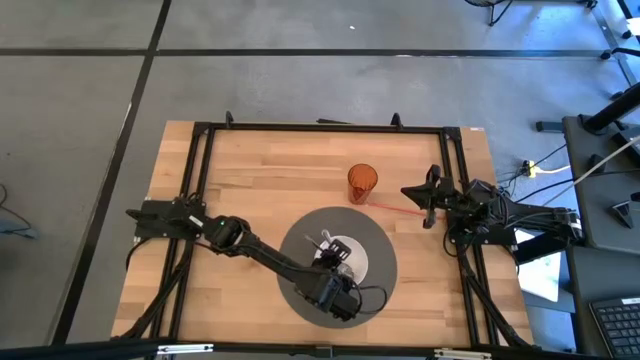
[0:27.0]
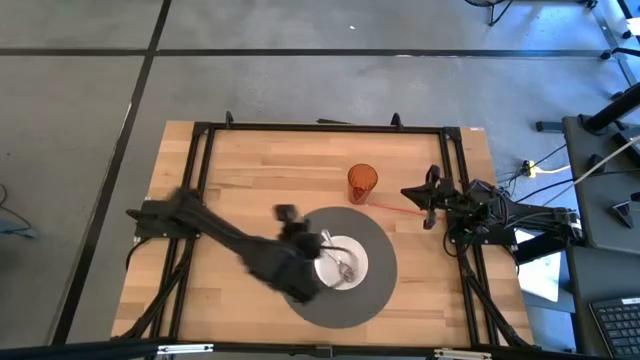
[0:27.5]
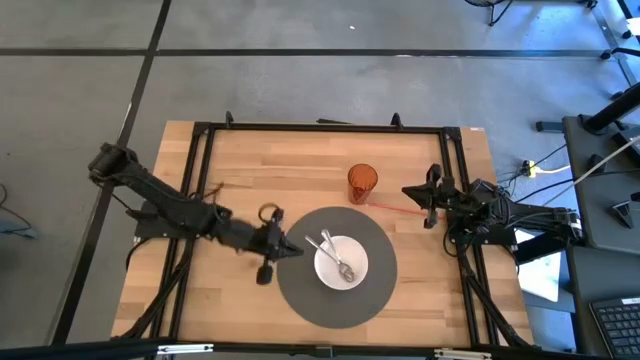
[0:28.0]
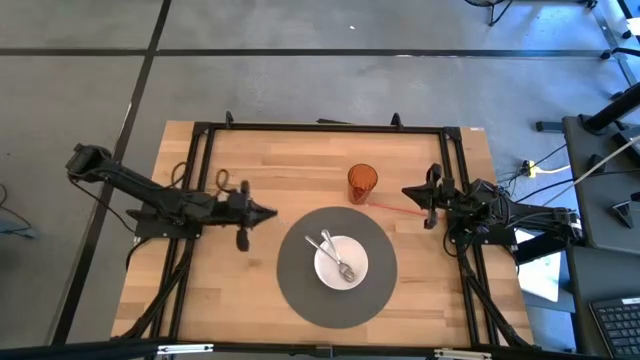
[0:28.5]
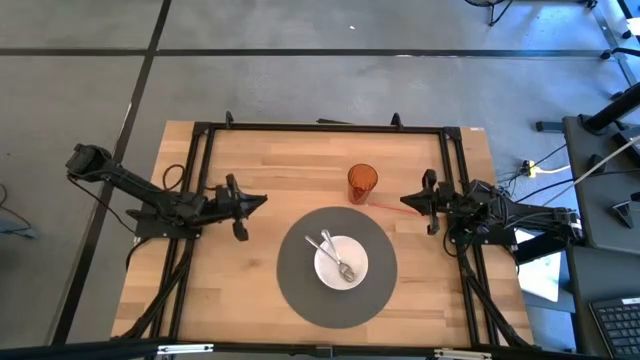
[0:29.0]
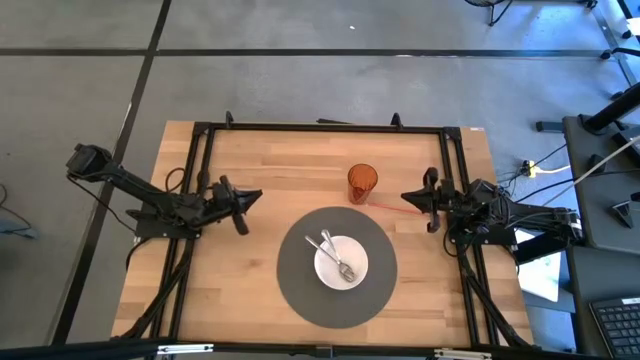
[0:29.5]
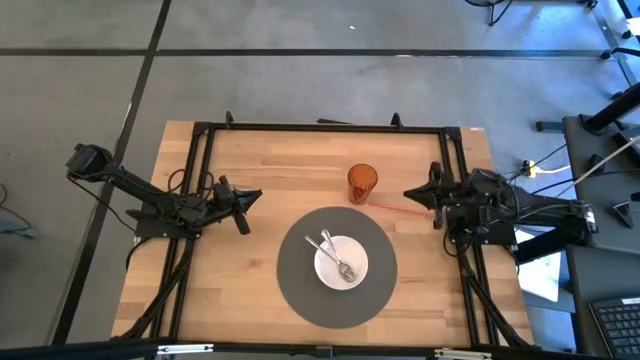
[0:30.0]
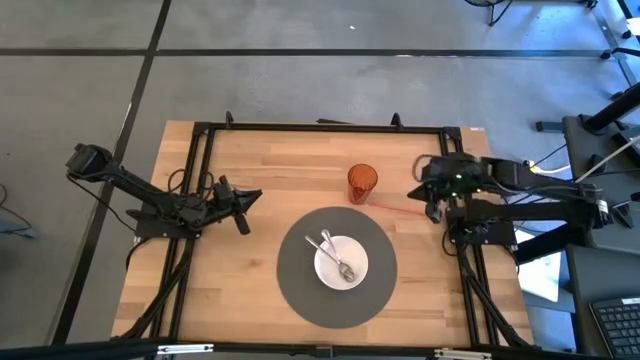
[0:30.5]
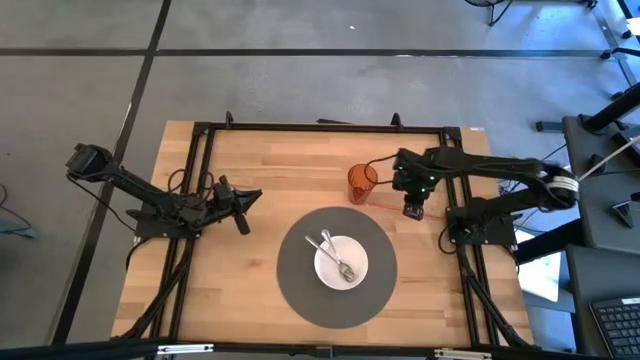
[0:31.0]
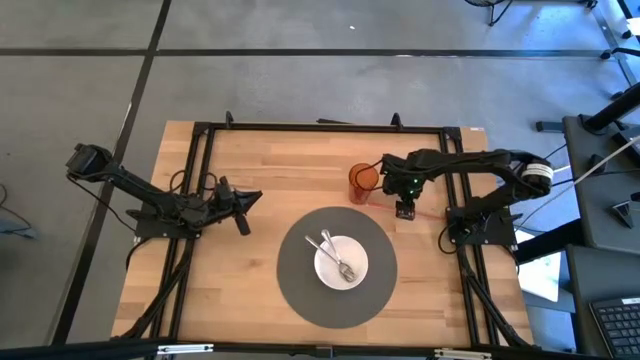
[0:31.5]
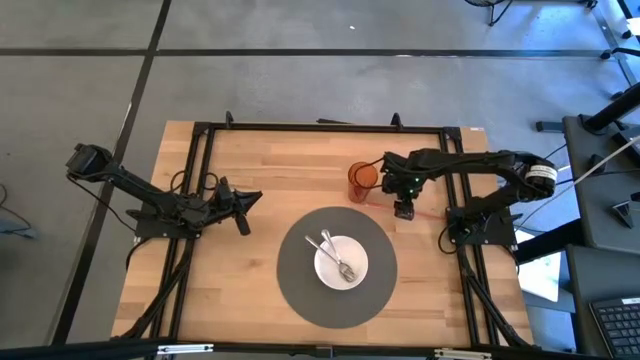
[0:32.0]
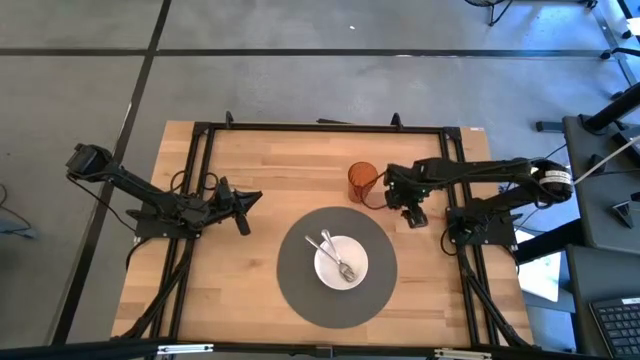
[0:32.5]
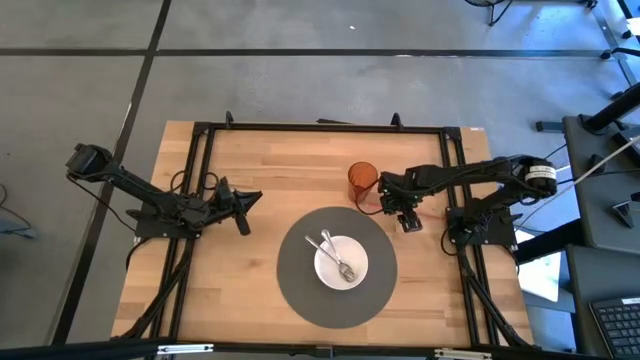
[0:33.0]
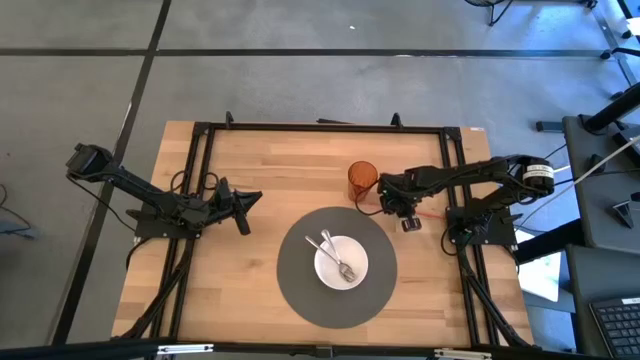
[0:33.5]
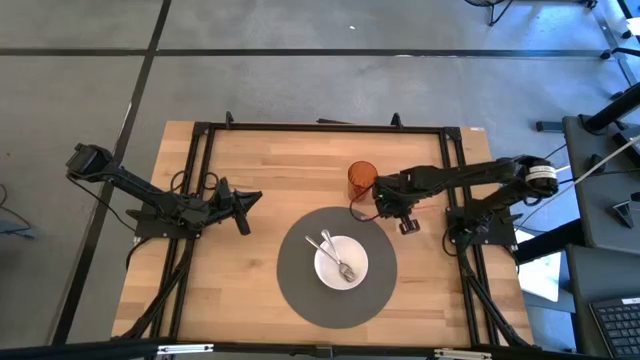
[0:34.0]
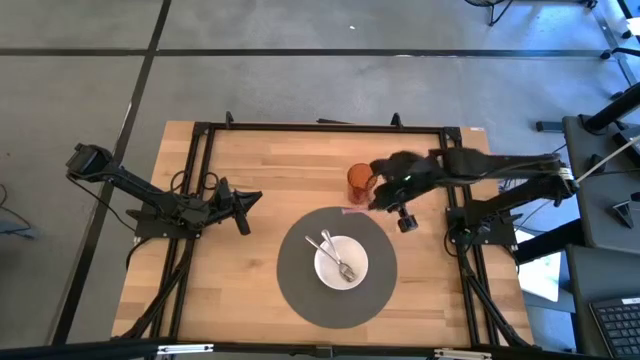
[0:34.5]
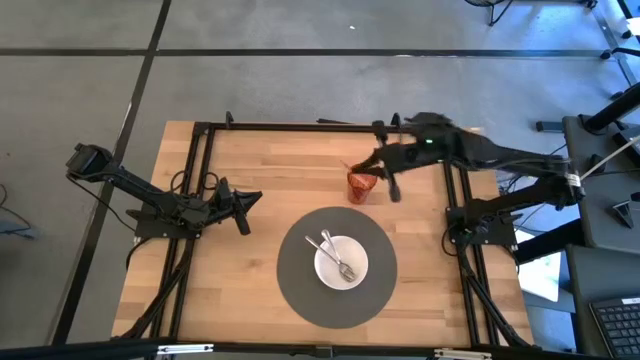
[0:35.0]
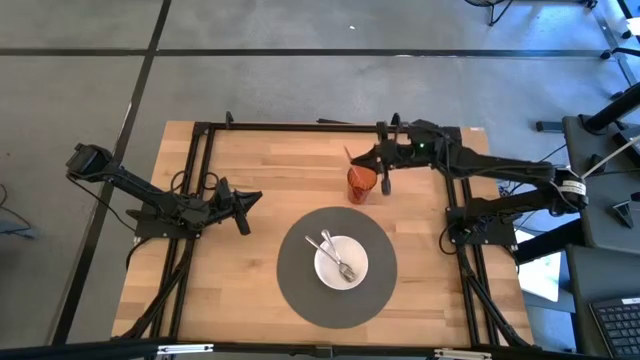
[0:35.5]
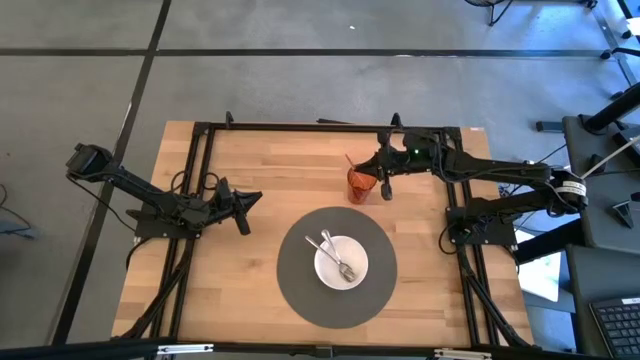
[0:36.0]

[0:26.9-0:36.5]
Task: Pick & Place Utensil
Put the orange straw into the red cup

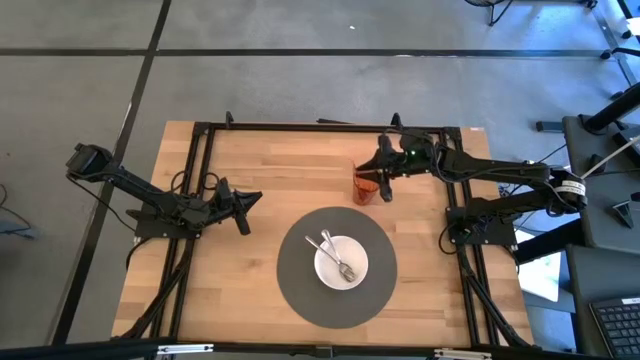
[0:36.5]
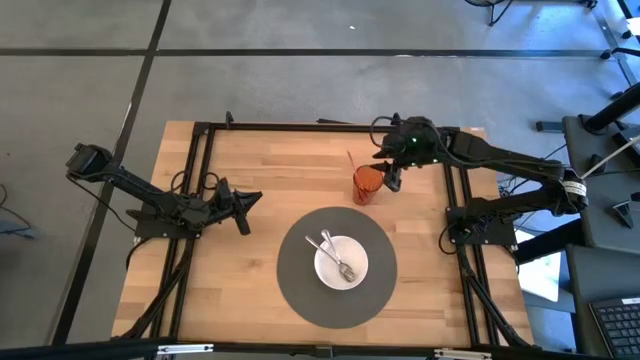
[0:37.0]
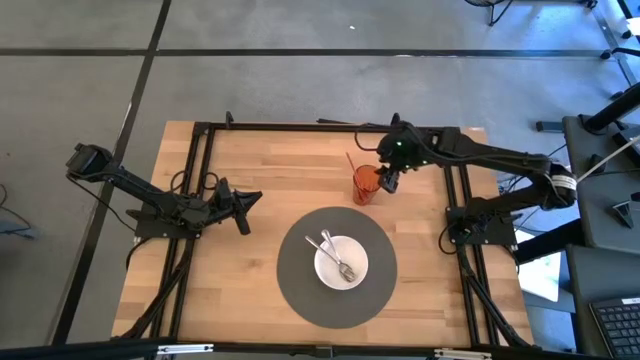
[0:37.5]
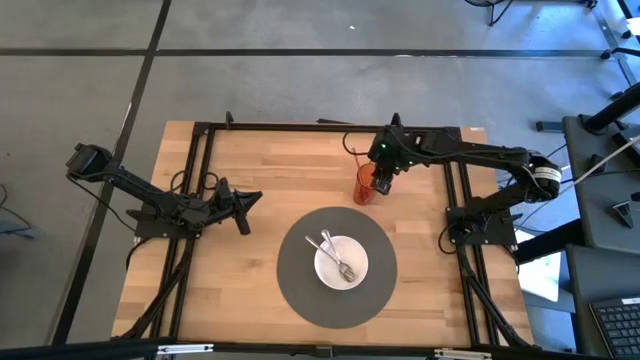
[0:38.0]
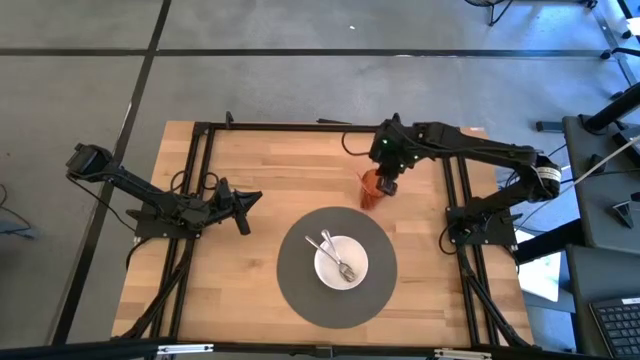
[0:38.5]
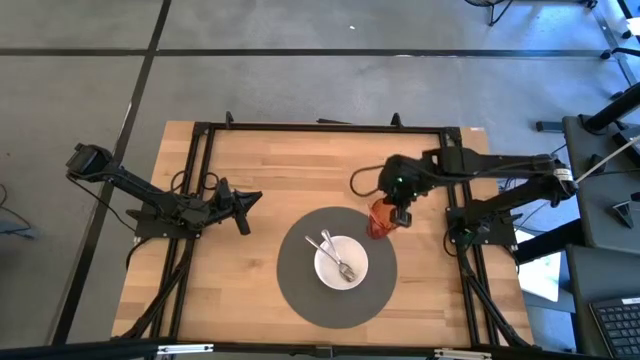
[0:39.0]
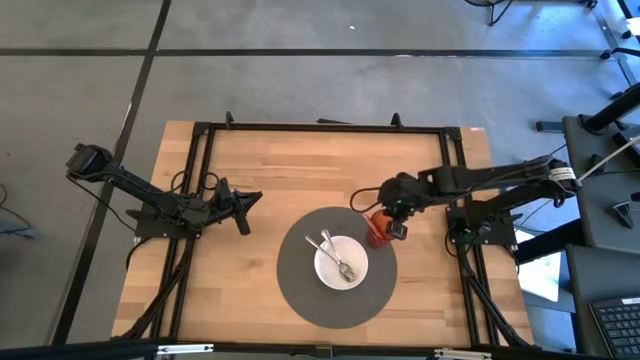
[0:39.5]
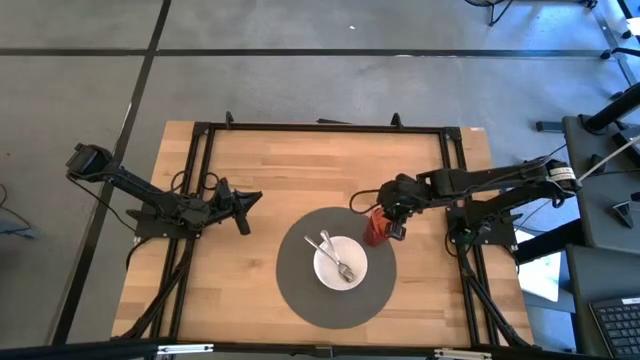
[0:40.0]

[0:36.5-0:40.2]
Put the red cup on the gray mat to the top right of the white bowl

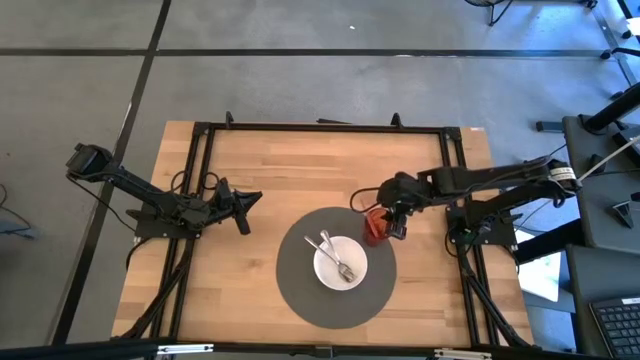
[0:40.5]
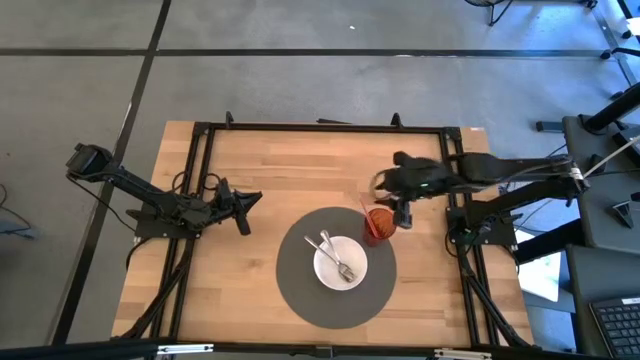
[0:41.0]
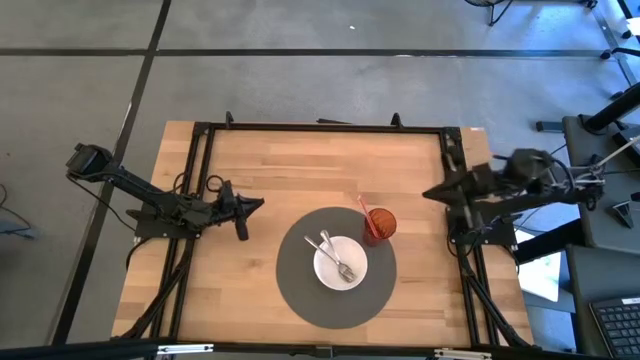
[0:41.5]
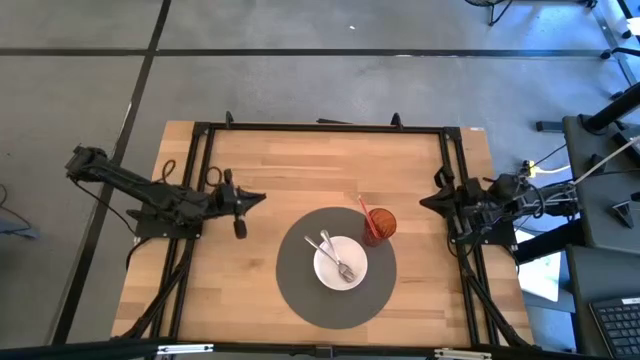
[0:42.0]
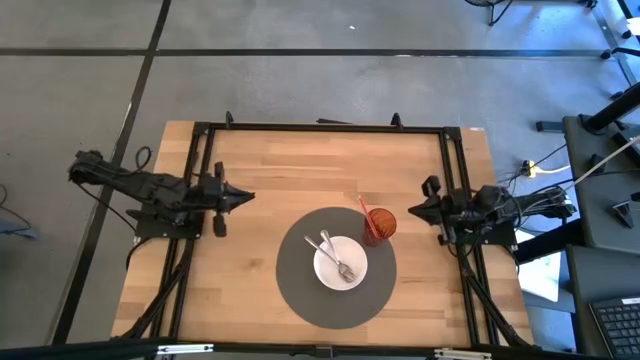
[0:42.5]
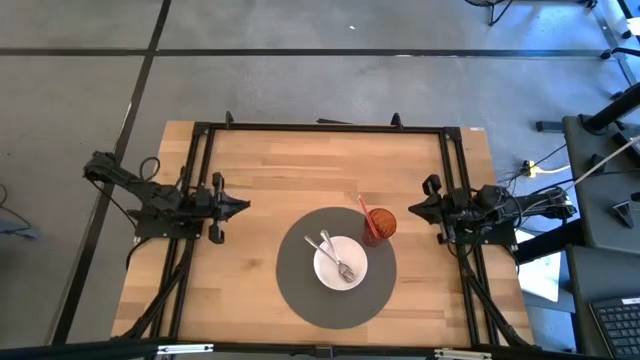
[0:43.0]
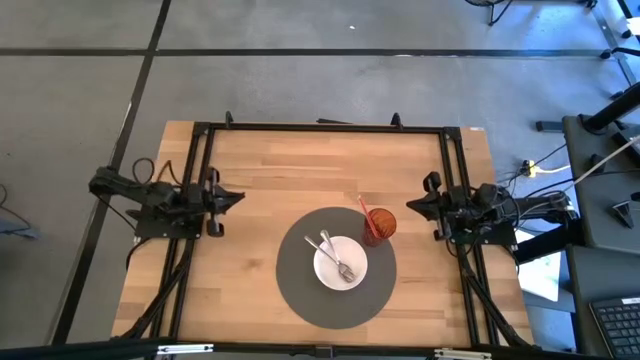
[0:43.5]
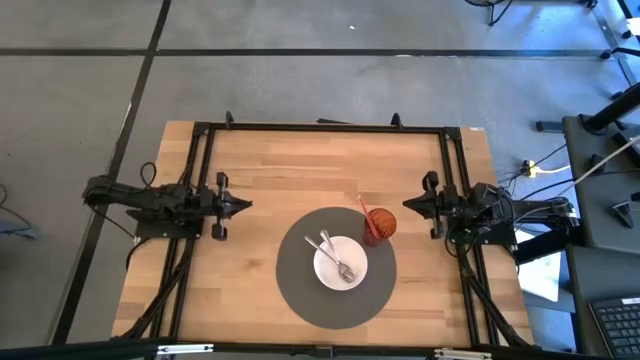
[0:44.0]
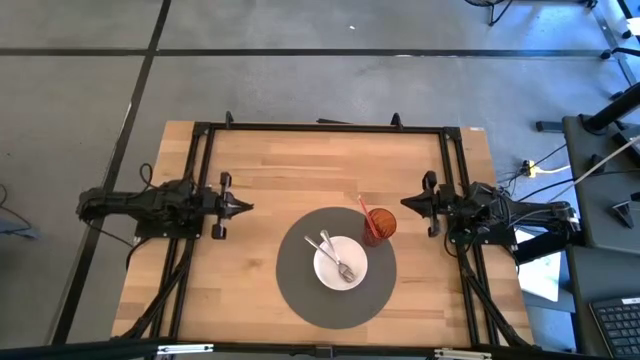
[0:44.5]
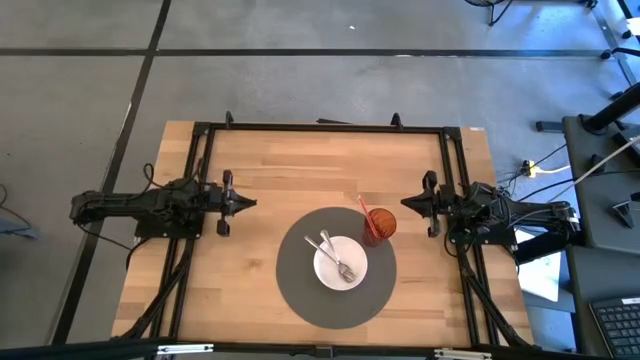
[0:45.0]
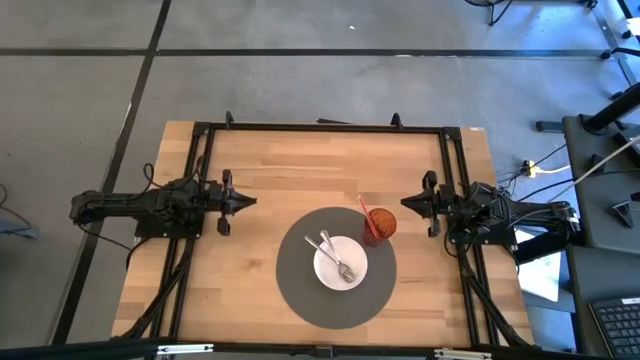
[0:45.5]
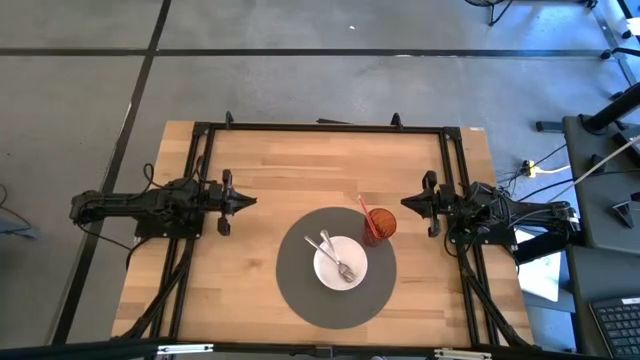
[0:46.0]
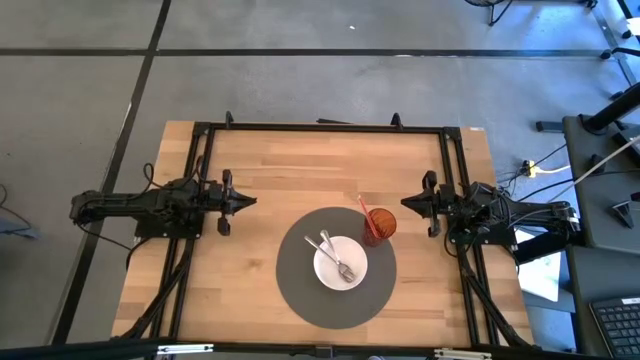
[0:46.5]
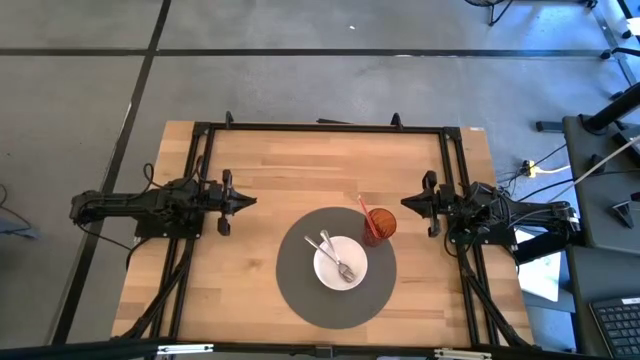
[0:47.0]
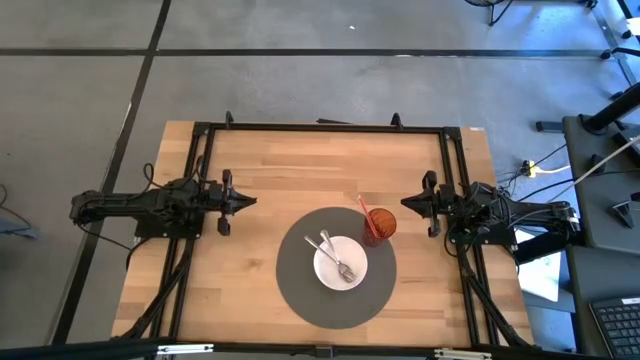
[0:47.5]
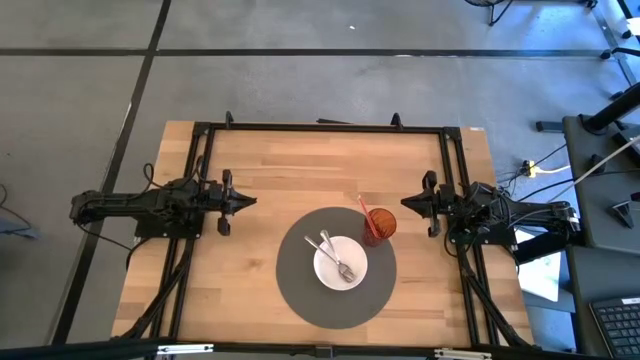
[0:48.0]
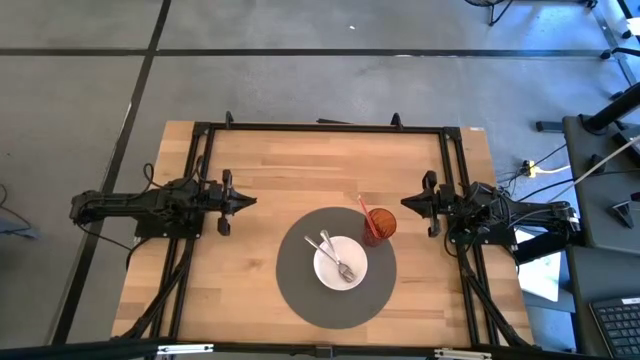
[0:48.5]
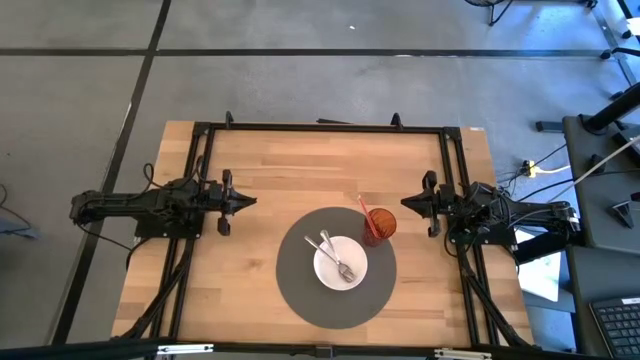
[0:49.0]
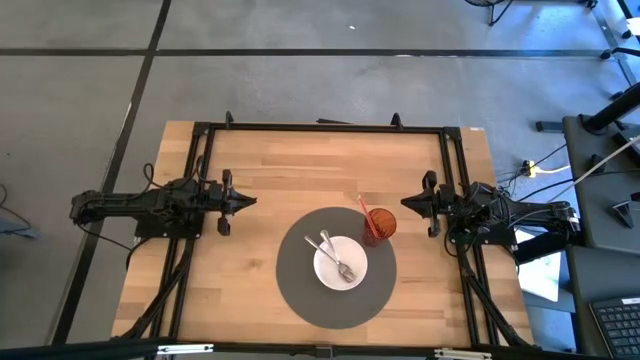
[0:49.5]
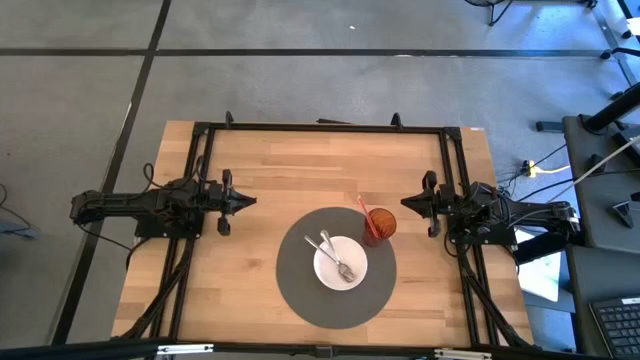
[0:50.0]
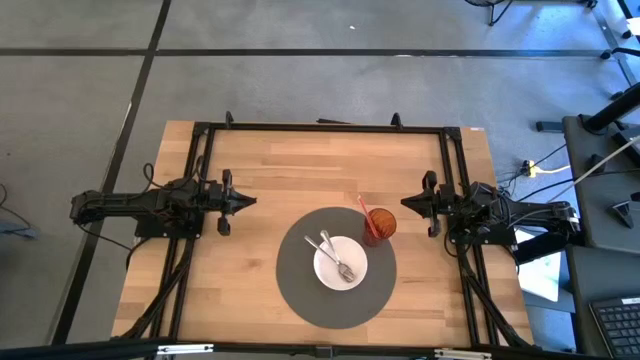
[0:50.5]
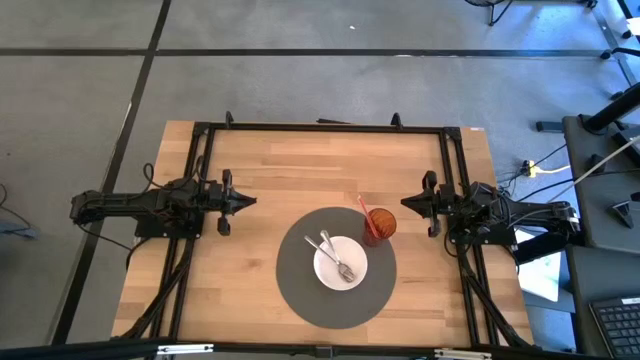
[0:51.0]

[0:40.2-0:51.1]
Return to Home Position
